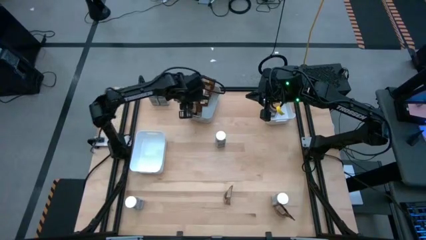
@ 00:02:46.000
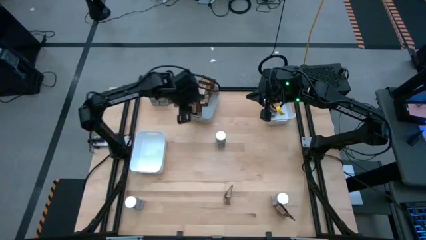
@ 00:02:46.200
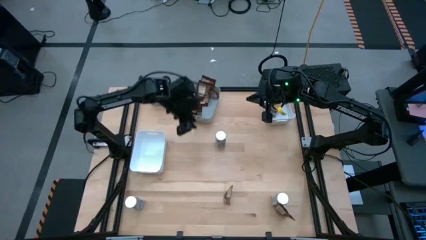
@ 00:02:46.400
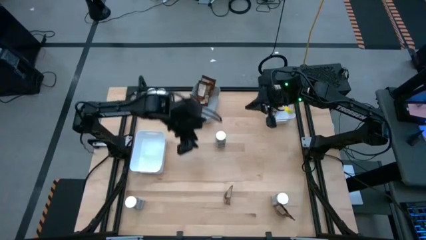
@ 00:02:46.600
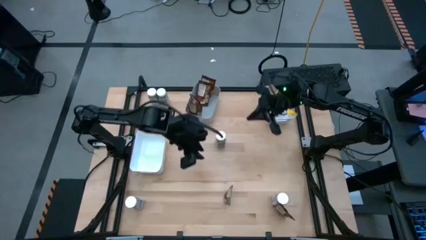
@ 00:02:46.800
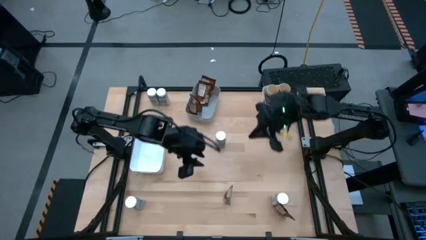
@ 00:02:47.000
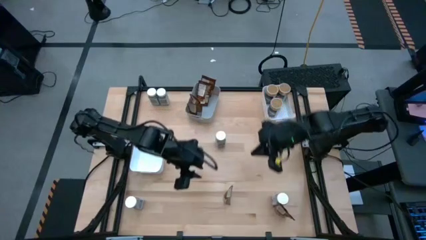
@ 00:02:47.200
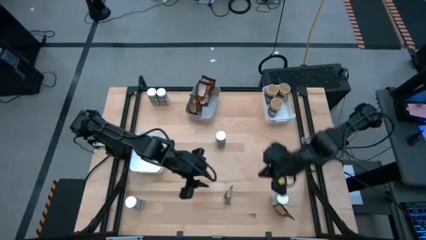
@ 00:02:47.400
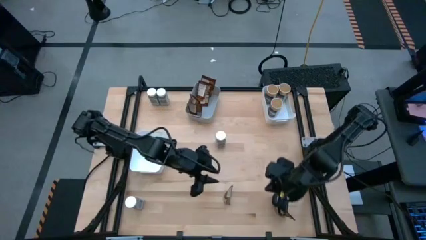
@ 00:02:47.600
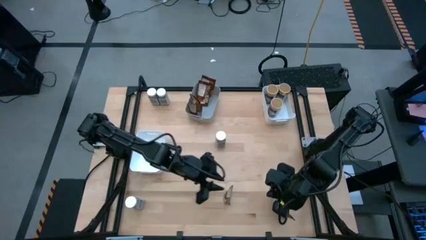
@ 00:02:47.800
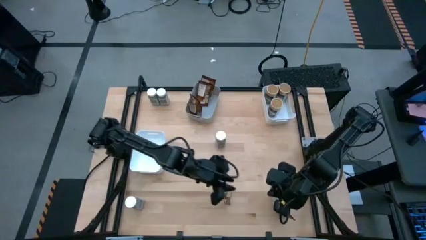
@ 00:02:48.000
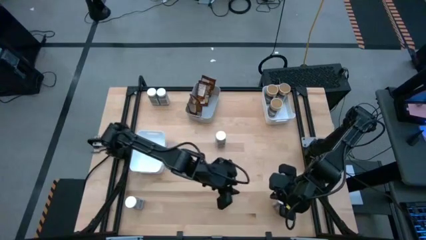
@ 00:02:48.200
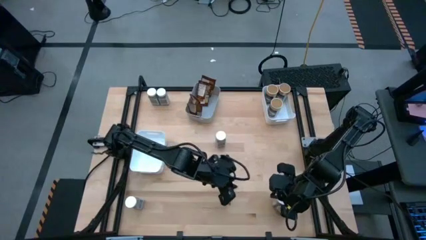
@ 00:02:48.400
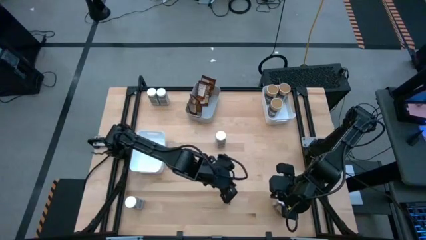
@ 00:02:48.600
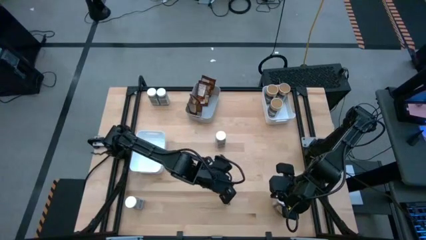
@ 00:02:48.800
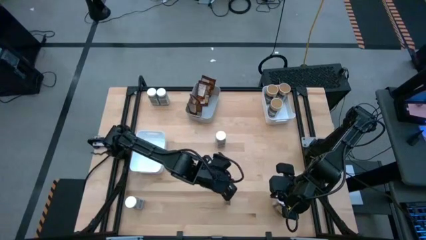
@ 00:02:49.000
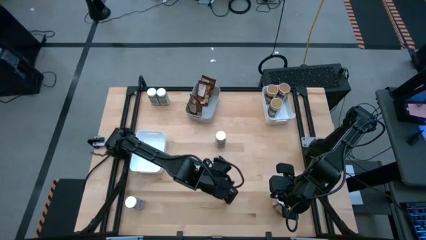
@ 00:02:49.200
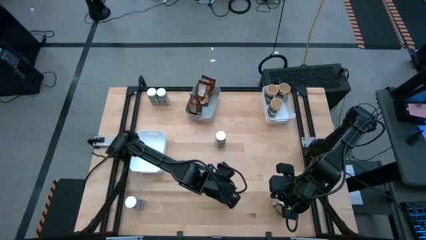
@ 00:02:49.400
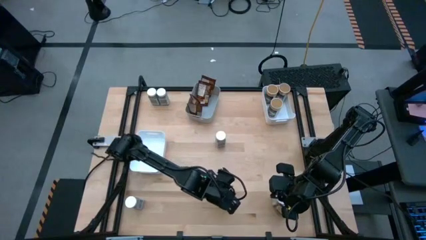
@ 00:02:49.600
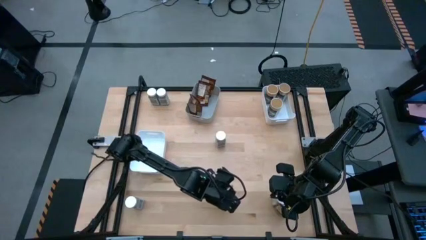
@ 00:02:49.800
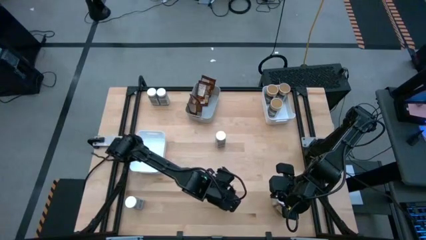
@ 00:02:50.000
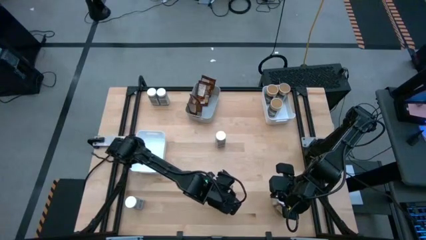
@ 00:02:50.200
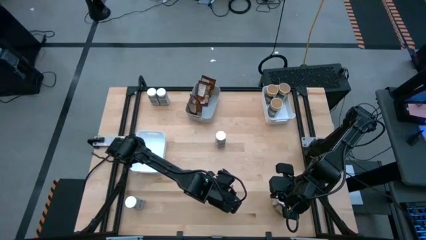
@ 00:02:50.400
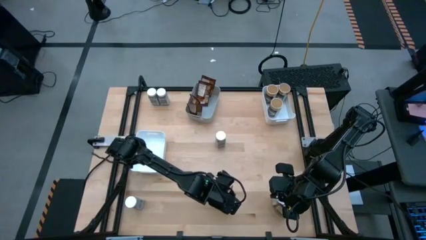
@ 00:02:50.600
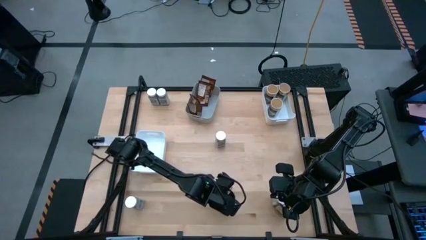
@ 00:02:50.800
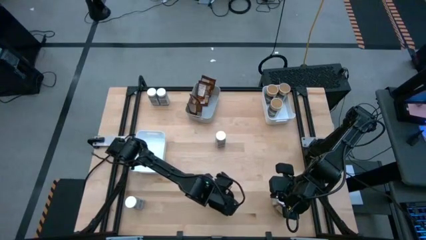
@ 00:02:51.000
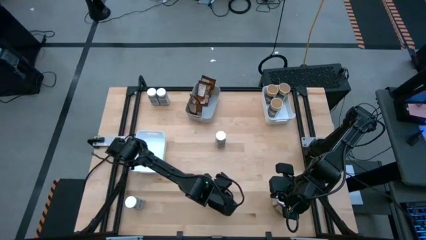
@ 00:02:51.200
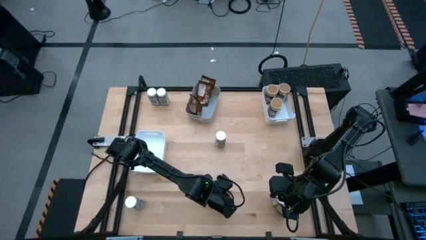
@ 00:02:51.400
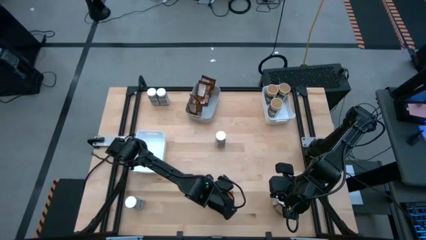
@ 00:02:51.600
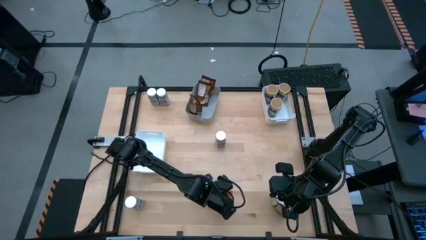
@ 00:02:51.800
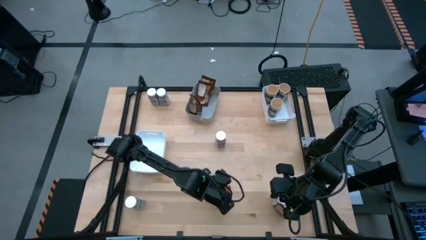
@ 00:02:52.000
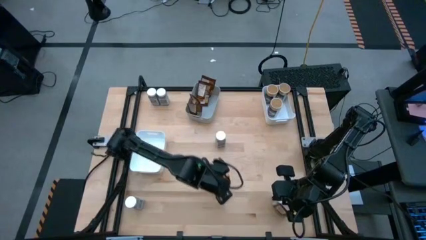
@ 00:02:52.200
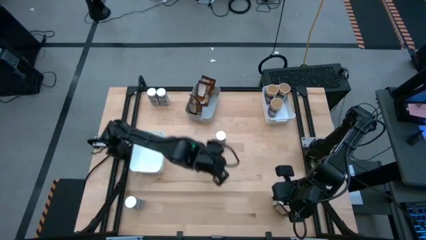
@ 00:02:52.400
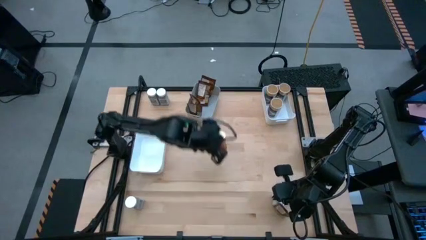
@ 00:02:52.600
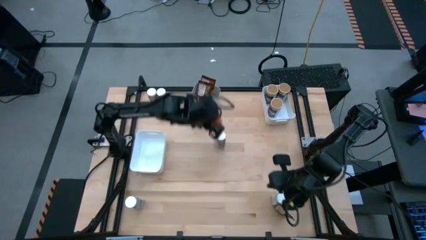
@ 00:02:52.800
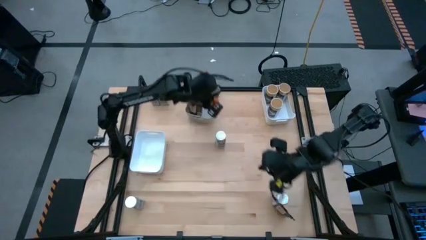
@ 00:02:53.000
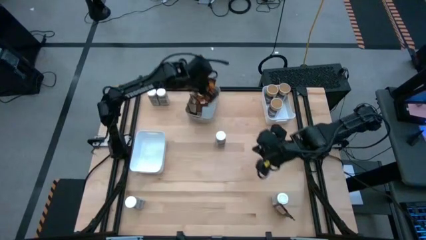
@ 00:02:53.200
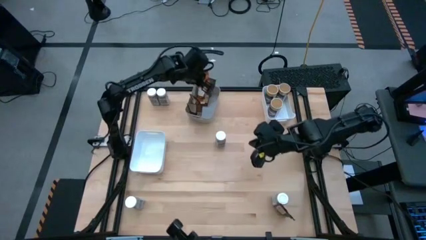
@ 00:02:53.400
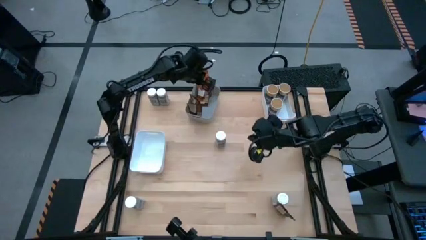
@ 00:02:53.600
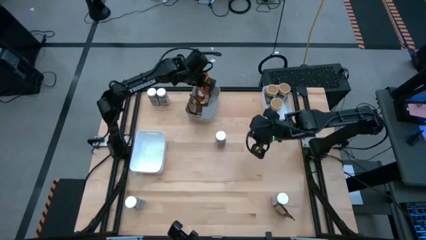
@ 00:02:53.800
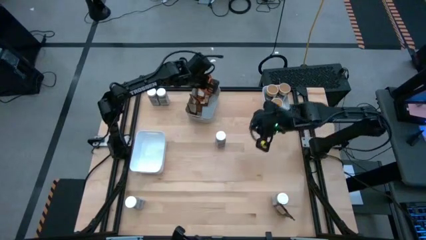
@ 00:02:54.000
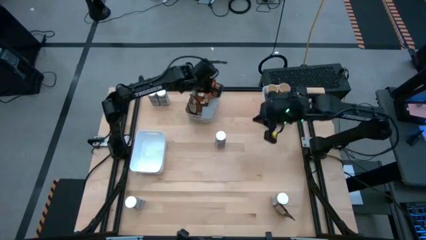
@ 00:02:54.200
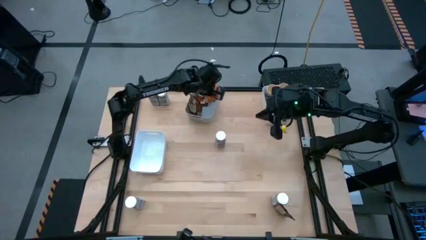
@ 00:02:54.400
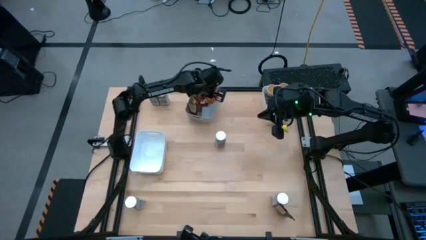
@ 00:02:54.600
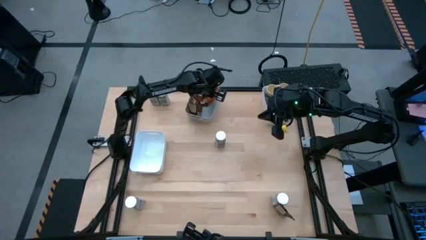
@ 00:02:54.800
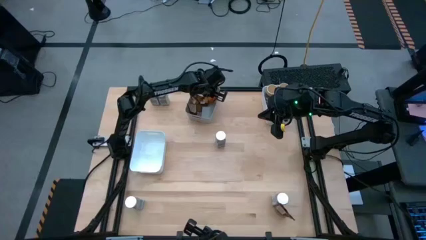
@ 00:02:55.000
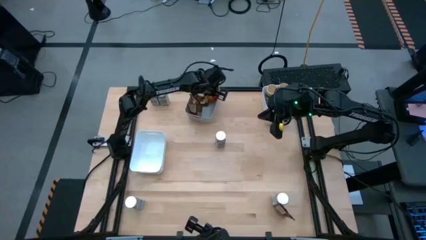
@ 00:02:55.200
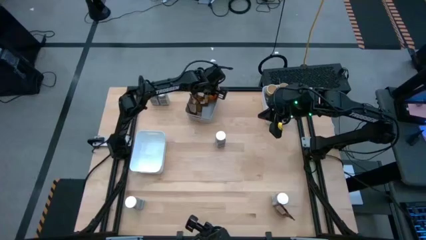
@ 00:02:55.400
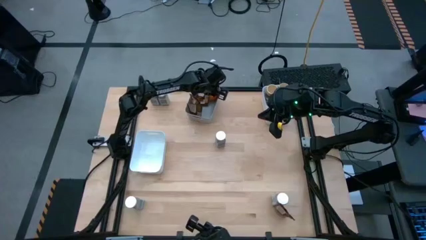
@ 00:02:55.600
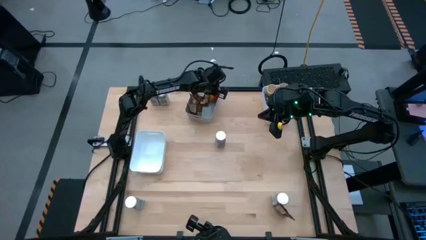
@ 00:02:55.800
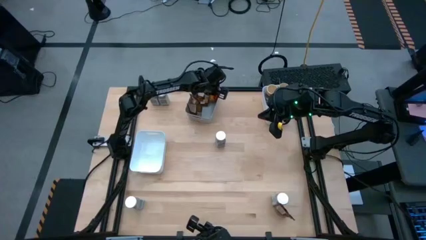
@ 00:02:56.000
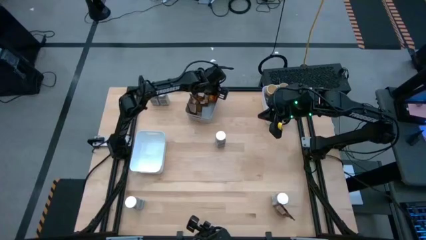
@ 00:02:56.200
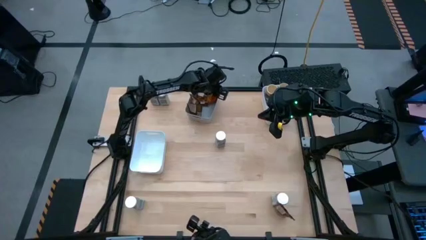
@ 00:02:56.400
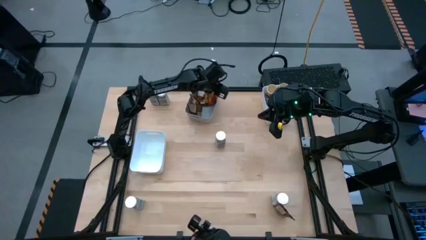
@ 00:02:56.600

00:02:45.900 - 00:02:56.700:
Task: Sort spices by type
Put the orange spice pack into the gray bin

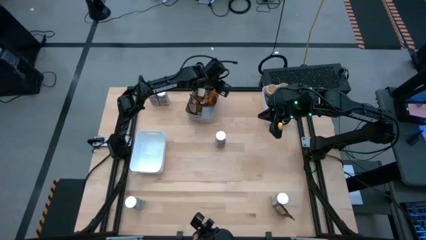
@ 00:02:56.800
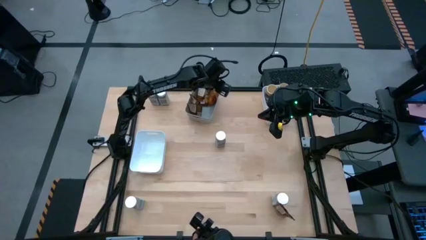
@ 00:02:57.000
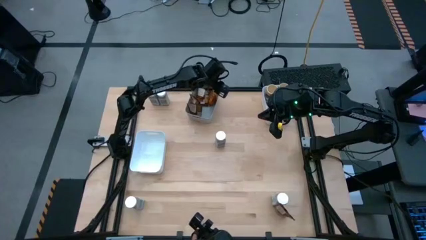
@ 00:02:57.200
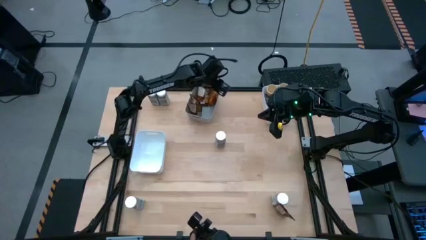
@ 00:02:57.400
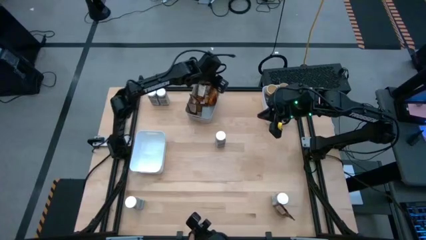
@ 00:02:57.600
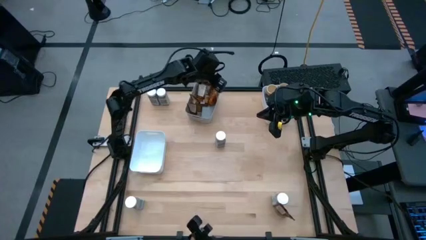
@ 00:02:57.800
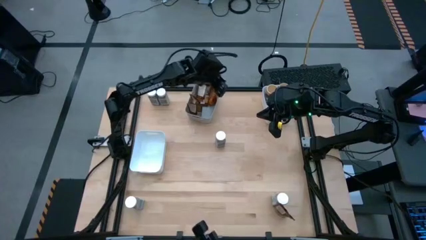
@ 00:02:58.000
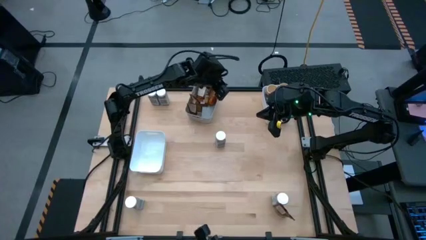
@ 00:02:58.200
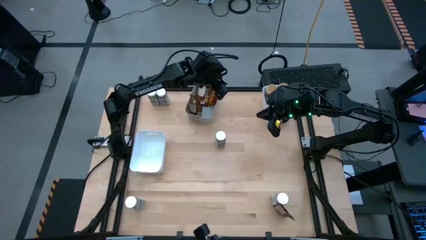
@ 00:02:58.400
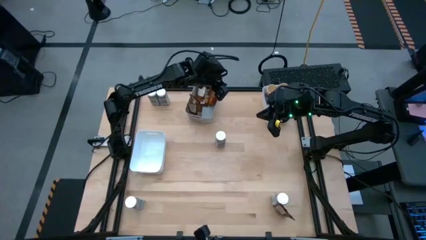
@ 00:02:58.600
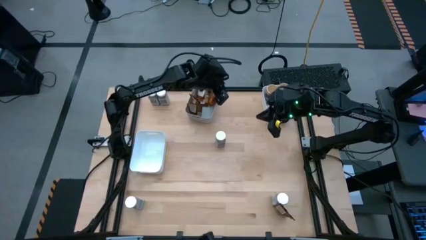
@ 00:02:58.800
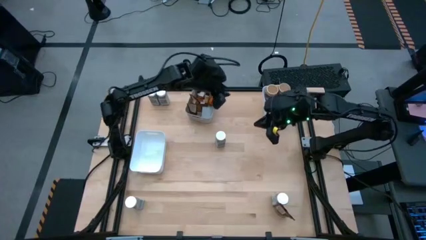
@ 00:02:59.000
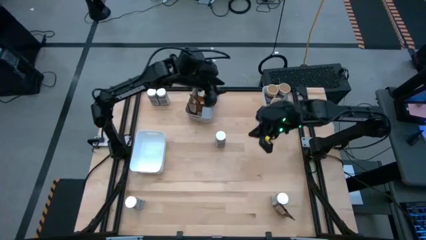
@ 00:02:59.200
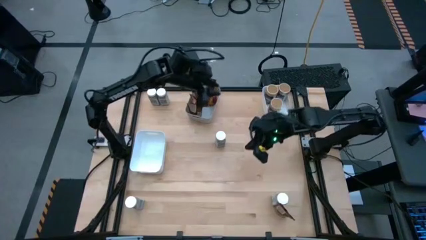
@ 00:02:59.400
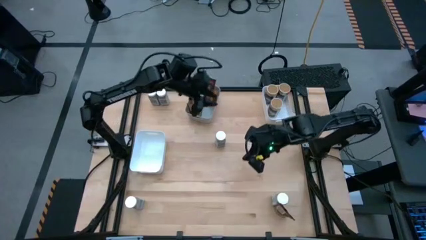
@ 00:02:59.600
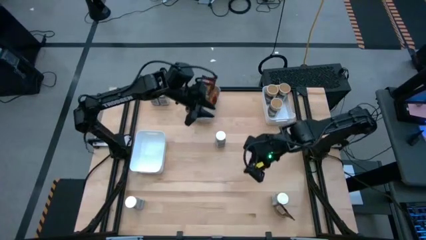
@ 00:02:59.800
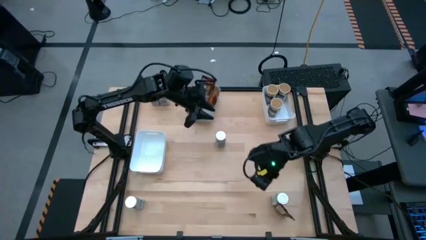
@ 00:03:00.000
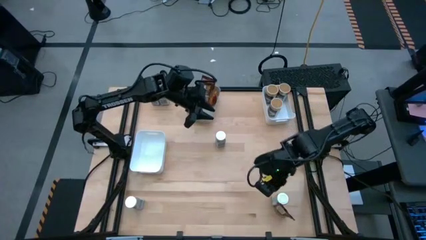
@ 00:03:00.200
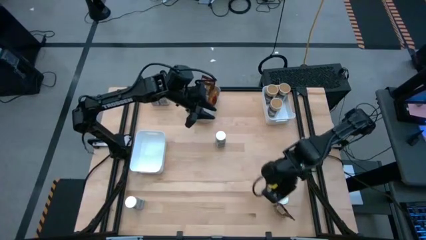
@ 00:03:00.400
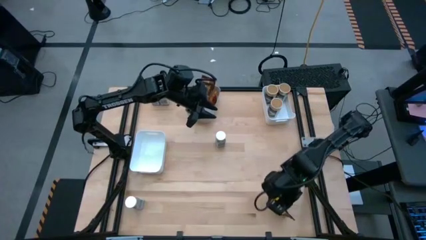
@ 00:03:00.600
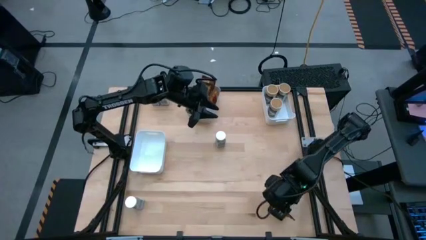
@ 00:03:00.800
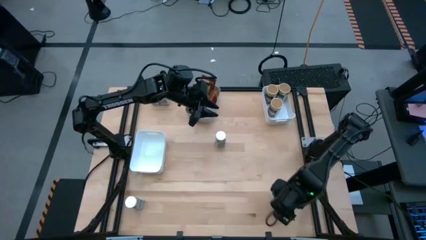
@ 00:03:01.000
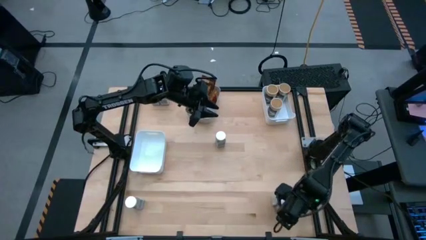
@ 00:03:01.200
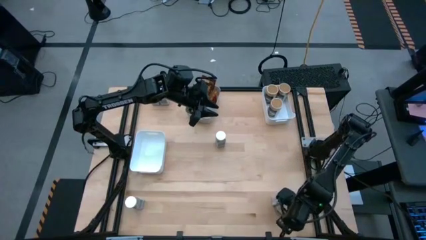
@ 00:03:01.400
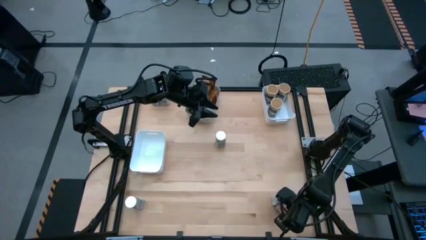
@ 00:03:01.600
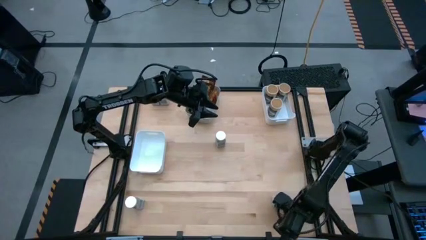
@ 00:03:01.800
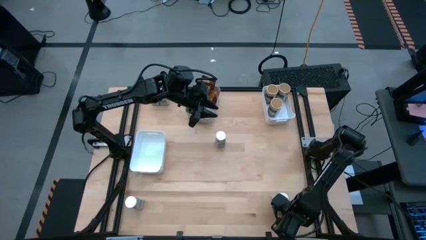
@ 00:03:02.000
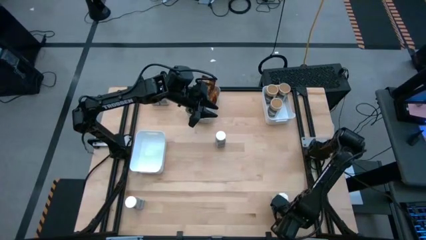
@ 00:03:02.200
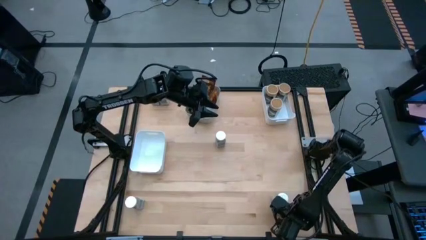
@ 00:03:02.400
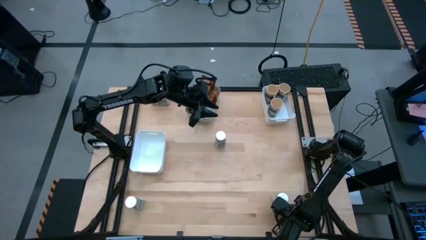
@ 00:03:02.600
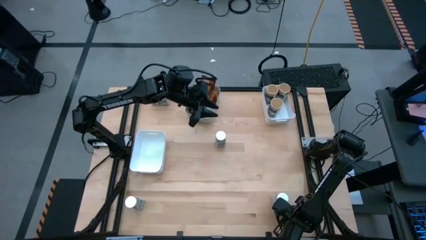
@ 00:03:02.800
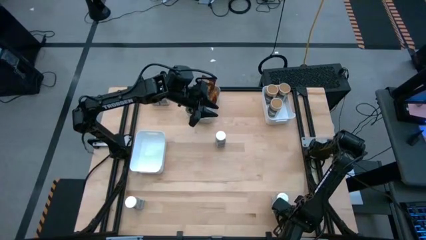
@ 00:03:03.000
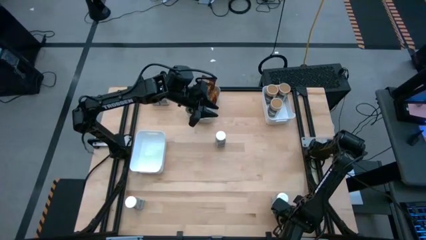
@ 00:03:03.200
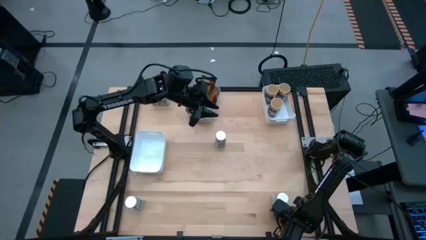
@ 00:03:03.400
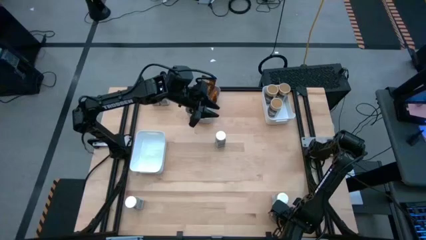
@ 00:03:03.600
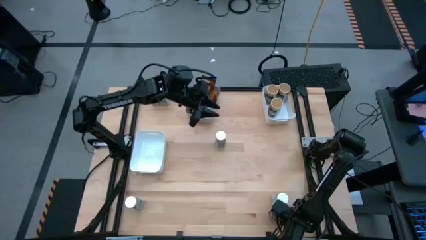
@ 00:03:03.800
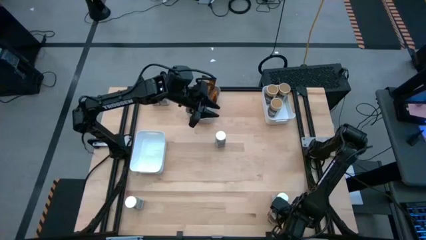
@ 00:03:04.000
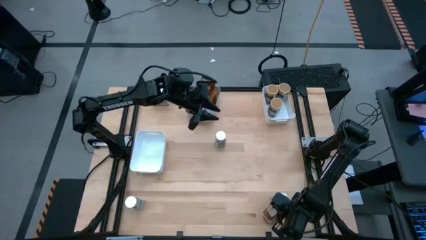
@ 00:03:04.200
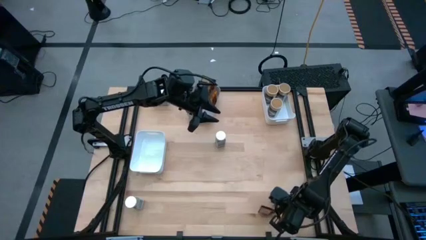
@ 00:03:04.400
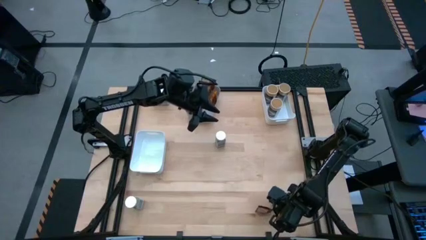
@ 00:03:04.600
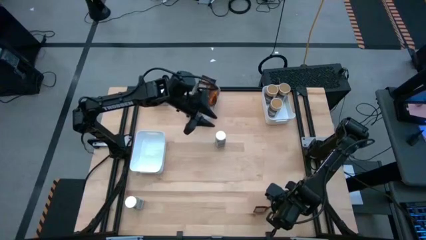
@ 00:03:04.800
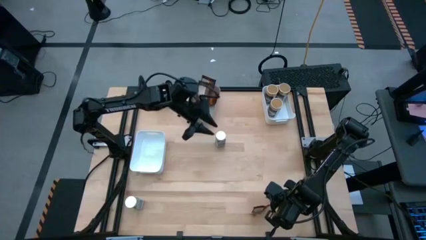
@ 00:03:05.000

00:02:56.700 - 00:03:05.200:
Put the orange spice pack on the gray bin
